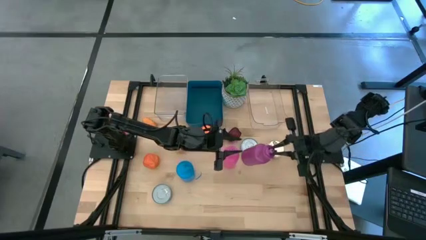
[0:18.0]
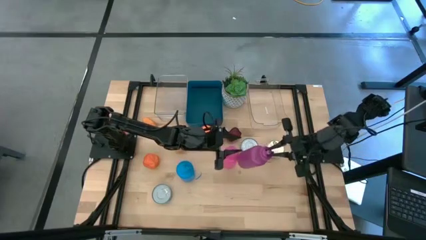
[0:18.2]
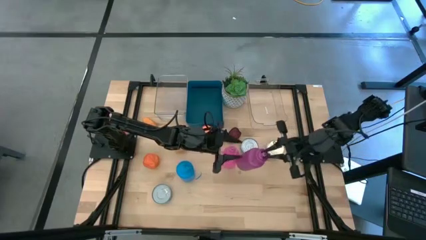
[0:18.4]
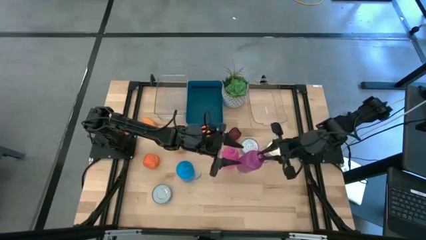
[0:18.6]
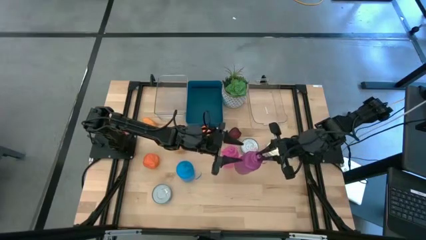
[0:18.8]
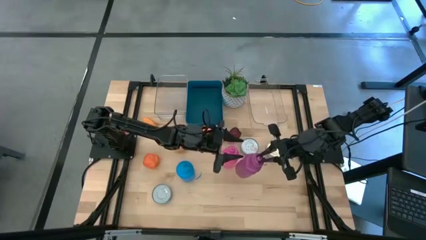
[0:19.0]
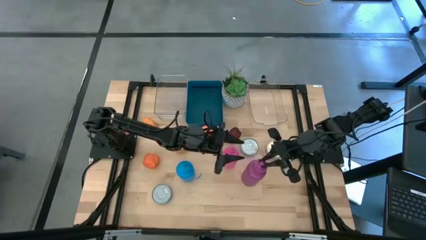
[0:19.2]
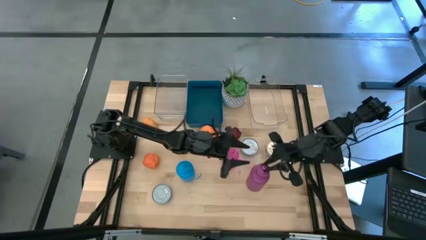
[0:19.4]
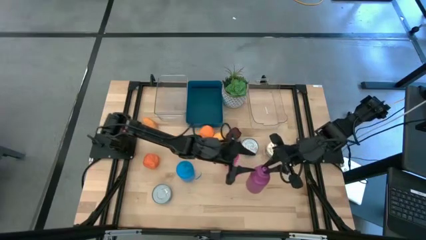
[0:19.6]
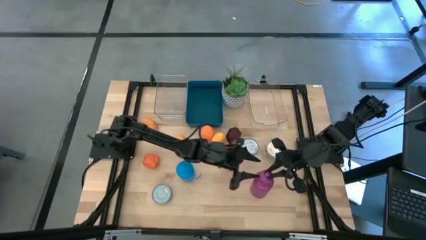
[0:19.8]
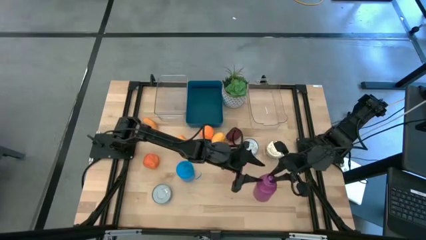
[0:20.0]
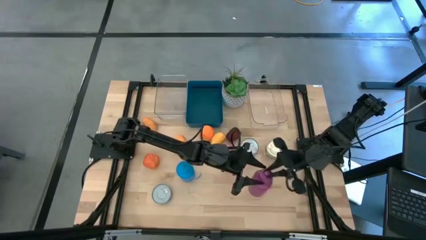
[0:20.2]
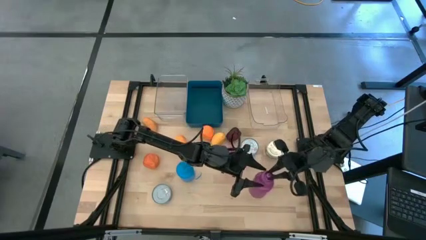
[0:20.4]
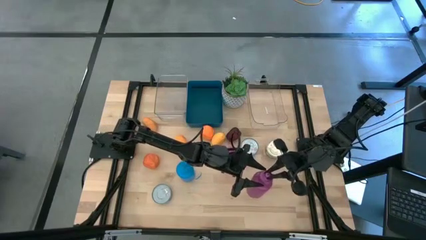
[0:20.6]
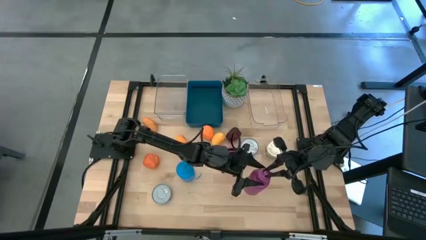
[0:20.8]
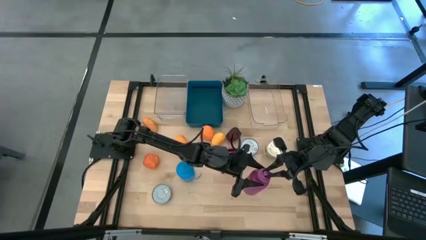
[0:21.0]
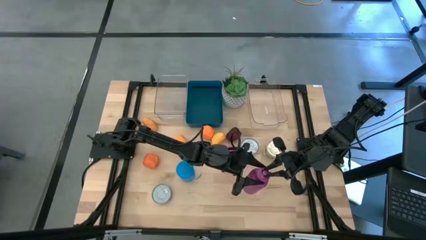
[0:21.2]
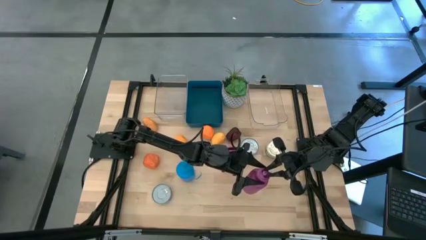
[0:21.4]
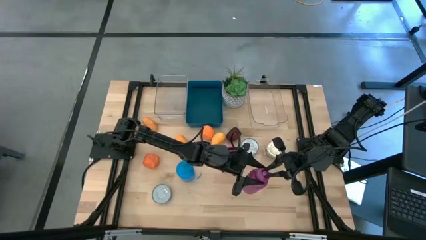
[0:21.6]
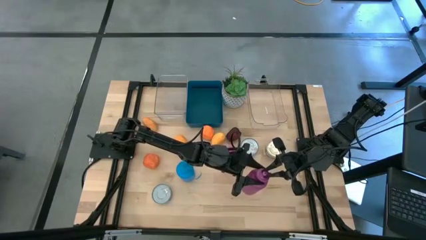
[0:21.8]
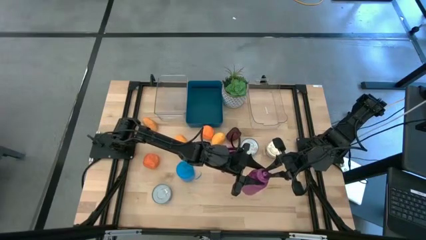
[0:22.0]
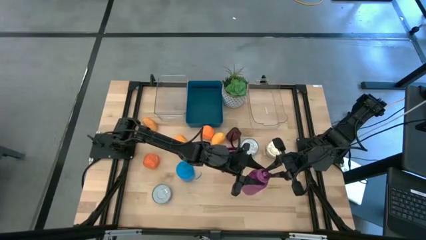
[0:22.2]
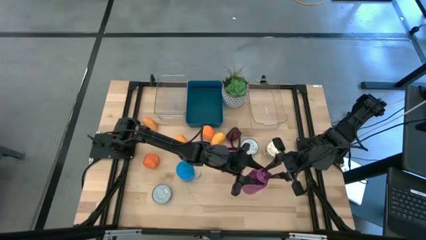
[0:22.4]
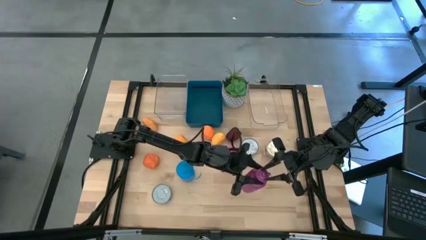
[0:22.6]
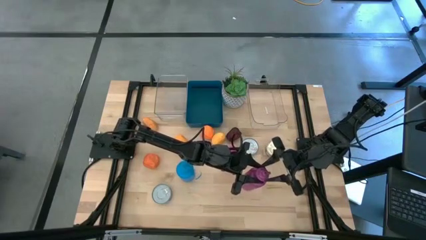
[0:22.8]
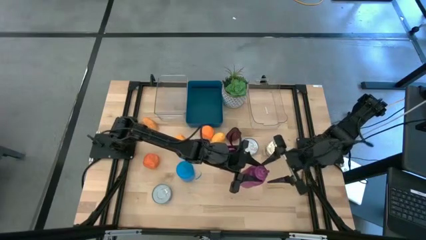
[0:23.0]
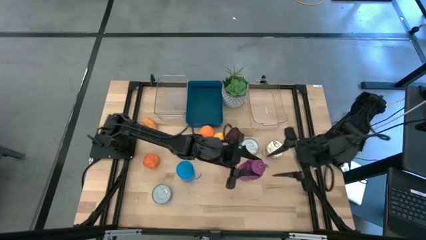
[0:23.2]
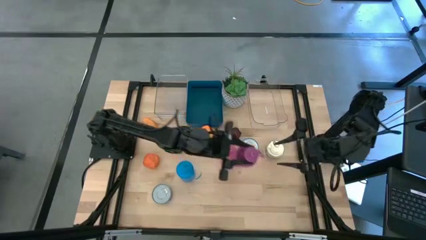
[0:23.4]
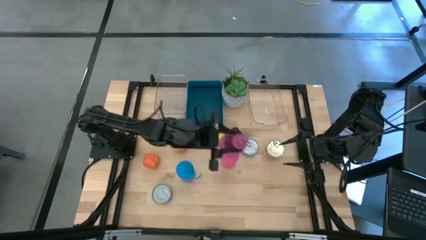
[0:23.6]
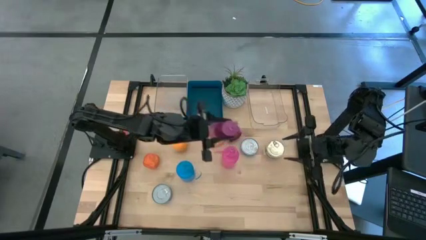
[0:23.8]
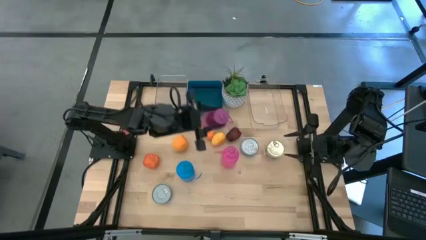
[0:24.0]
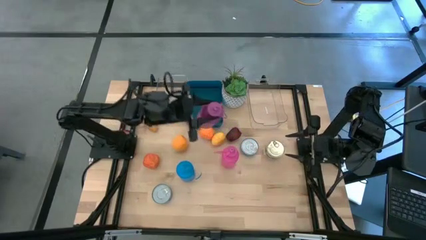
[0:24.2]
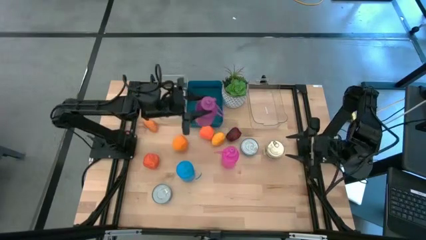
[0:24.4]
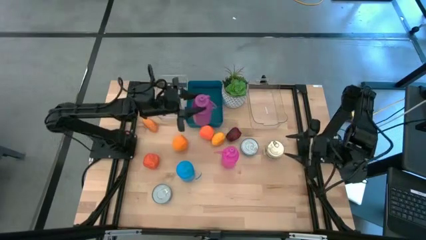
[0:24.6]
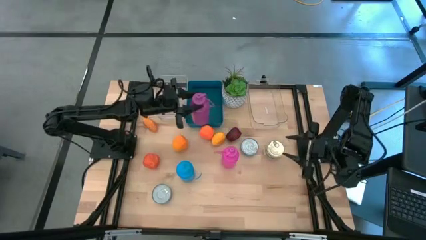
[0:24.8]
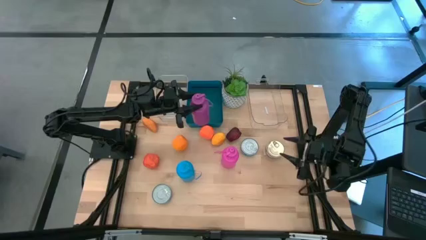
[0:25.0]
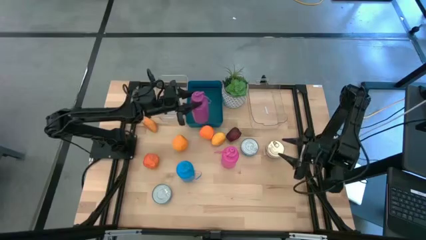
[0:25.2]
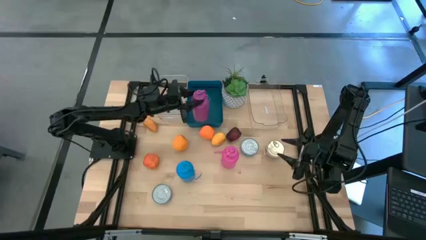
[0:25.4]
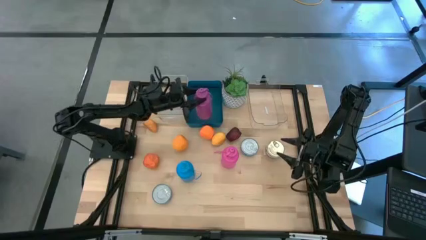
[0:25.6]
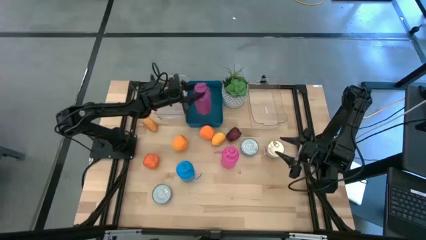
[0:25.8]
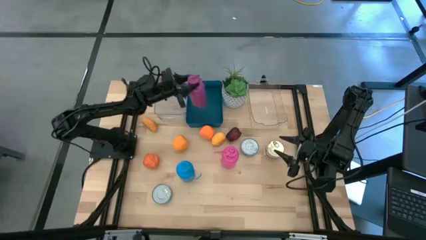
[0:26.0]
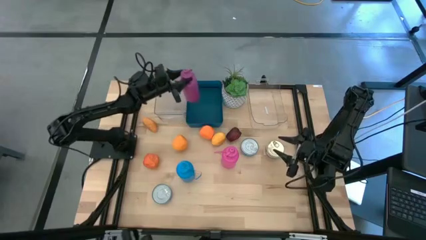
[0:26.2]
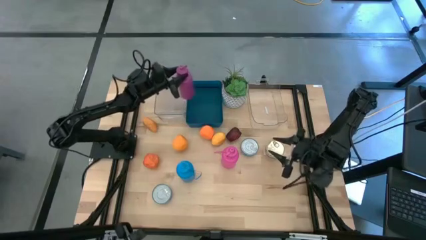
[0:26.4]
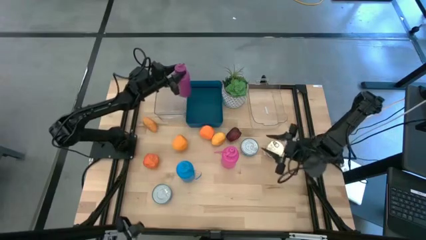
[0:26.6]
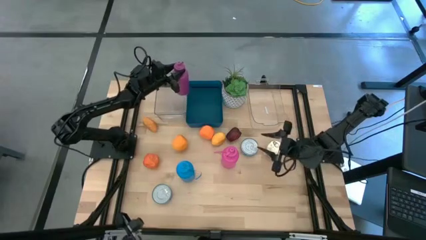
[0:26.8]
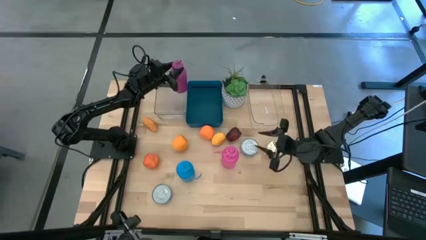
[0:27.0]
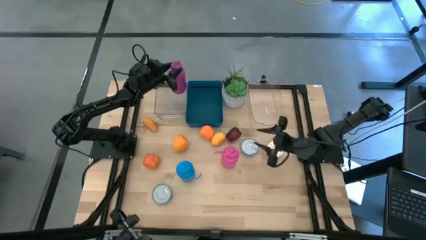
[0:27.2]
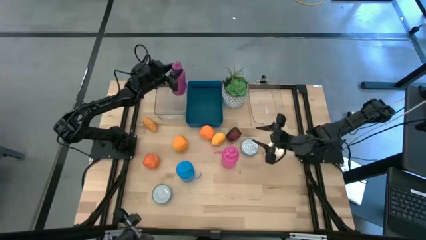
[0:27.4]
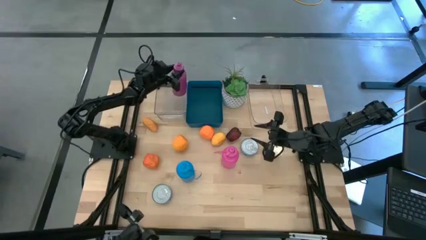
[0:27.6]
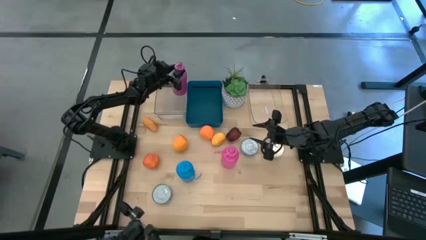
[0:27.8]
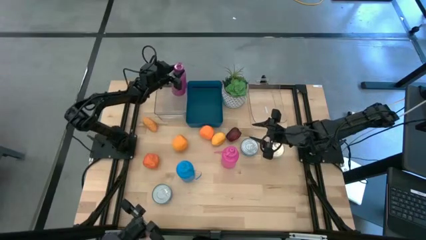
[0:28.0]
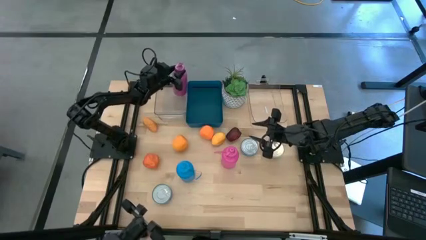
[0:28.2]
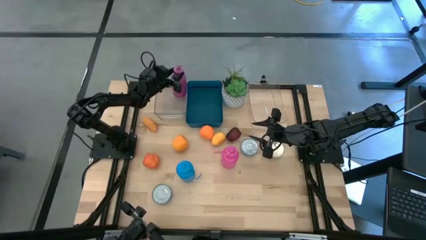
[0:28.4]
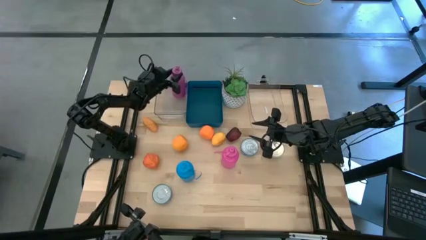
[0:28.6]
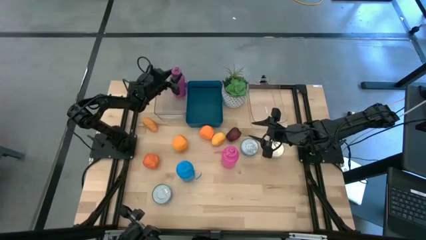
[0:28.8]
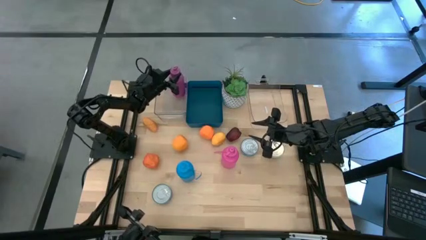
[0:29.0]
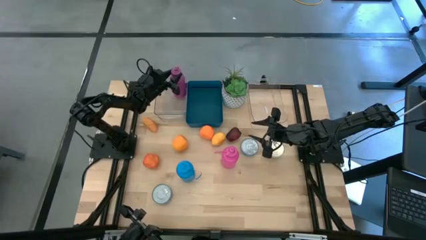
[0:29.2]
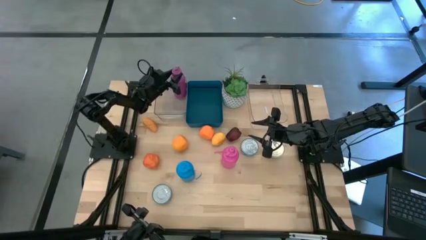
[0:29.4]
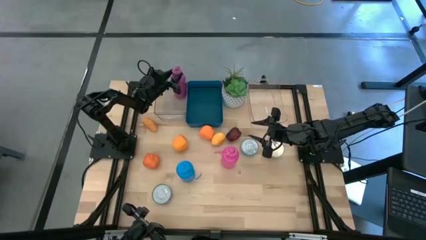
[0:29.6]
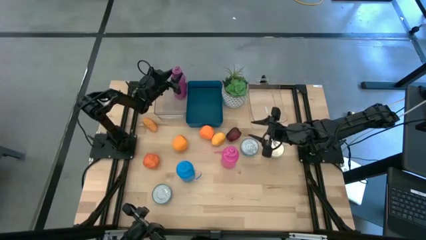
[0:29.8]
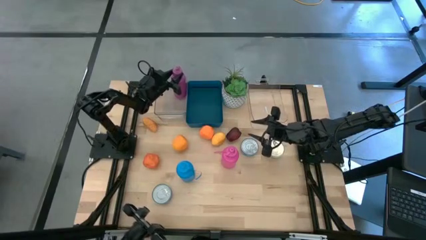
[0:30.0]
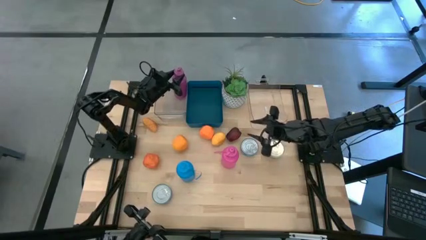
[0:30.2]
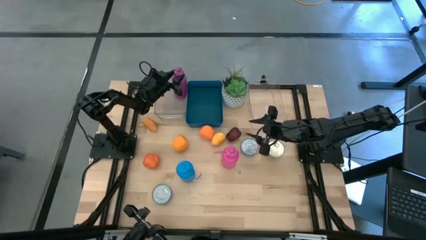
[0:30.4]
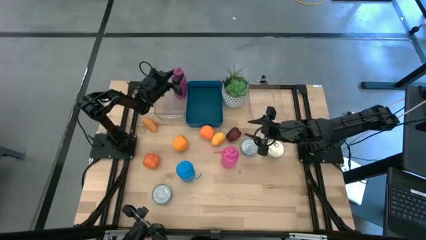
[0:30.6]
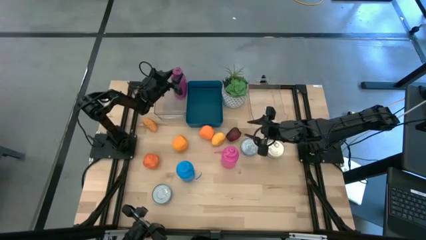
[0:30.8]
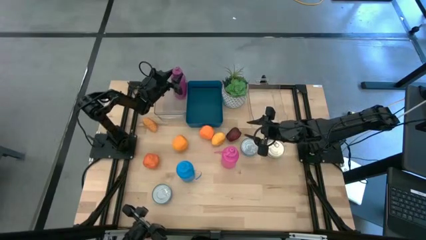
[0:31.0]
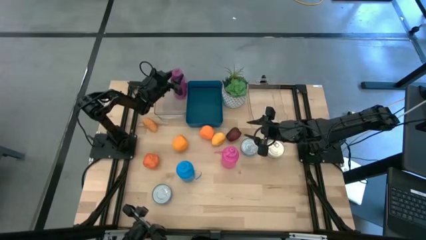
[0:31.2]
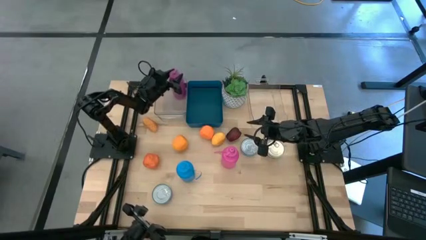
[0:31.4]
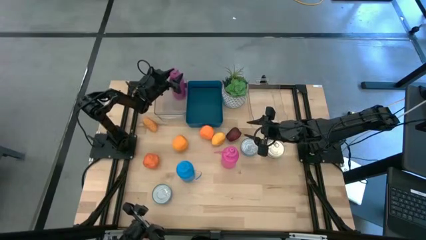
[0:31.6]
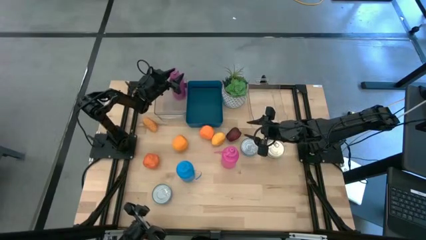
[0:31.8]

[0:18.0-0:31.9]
Task: Pick & Place Food Item
Put the purple water bottle into the left transparent bin

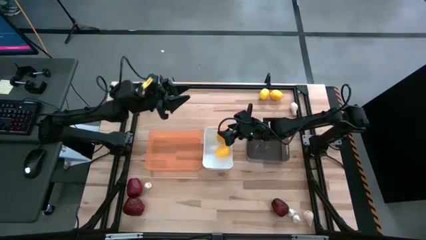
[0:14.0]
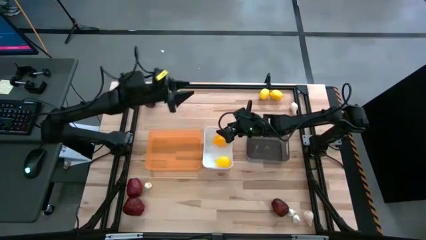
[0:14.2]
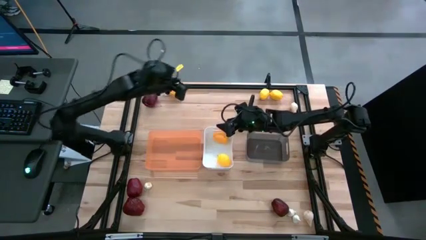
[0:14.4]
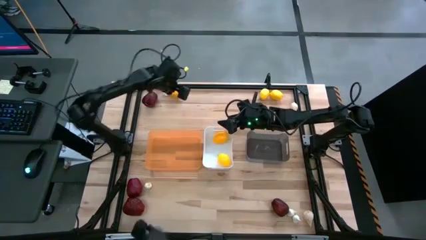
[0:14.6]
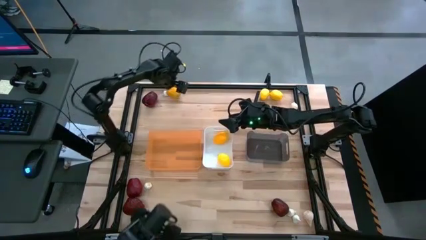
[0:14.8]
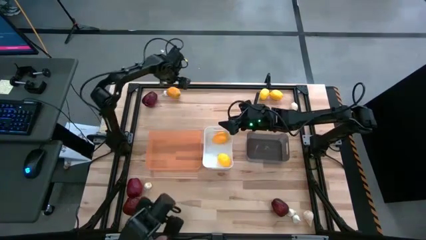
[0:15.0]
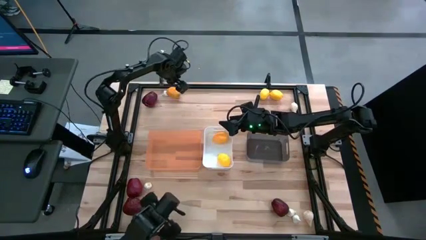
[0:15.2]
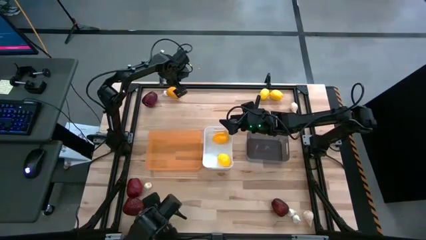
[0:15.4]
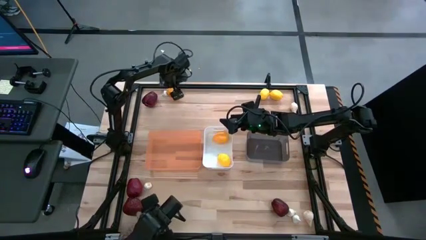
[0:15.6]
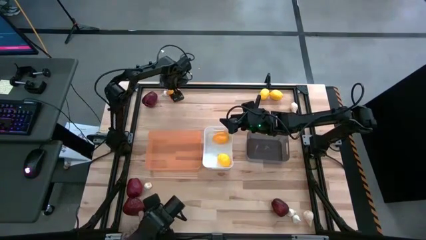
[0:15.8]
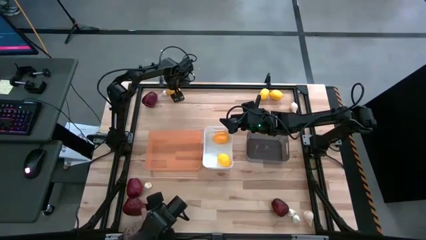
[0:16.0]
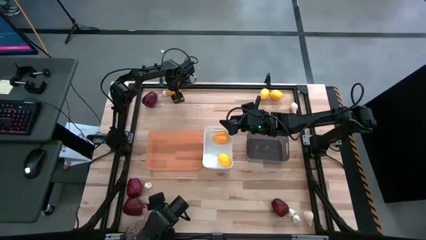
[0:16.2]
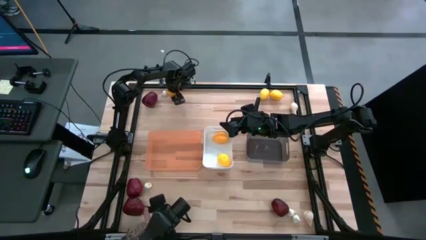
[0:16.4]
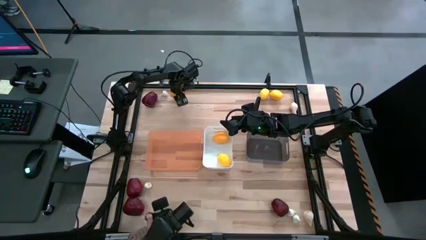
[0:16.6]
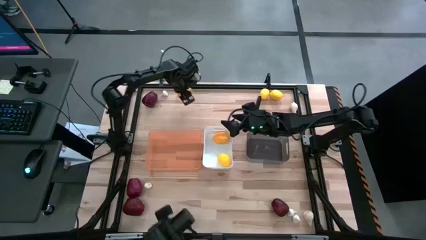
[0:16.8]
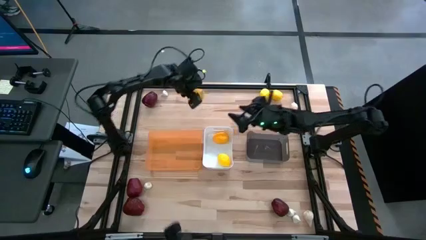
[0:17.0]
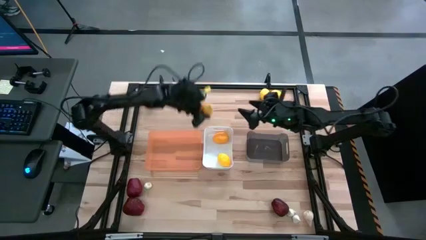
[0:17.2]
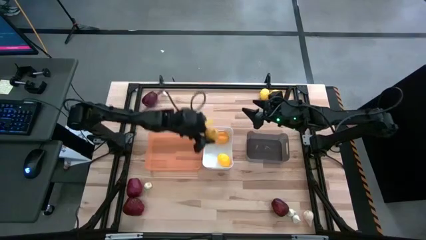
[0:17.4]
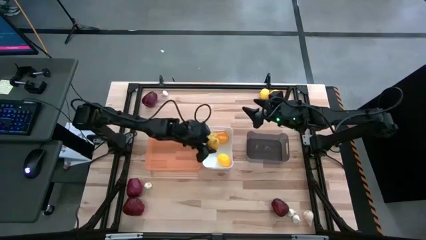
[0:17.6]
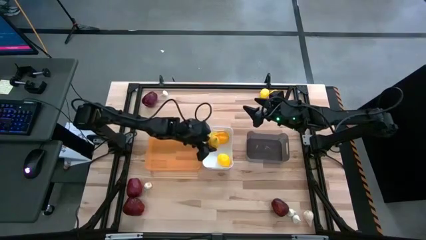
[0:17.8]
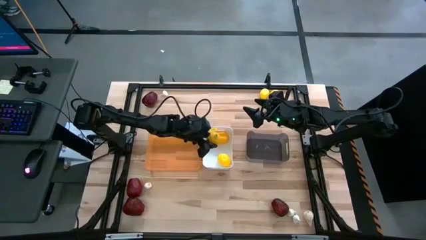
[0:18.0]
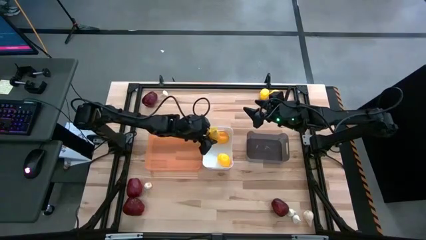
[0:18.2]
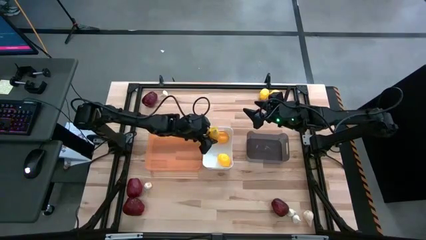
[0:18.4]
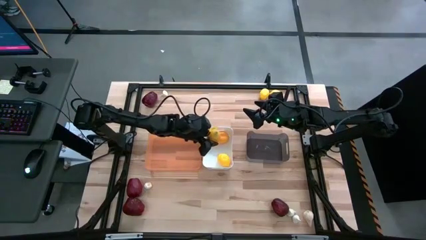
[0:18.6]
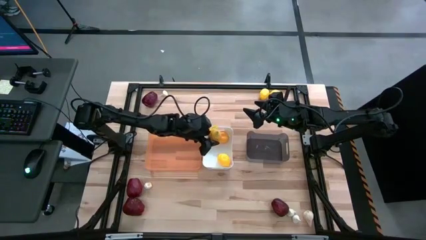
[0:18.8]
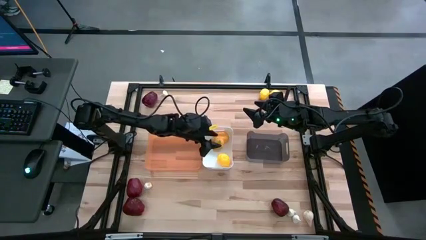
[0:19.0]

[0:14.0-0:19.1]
Task: Sort produce into baskets
Put the yellow lemon into the white bin
